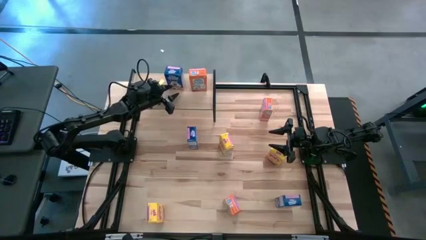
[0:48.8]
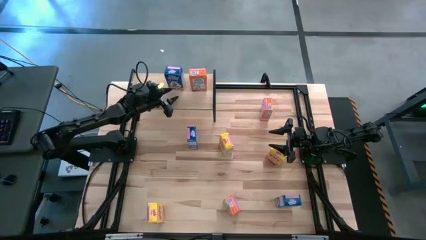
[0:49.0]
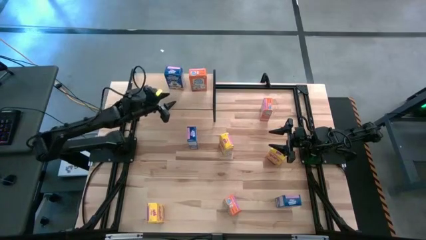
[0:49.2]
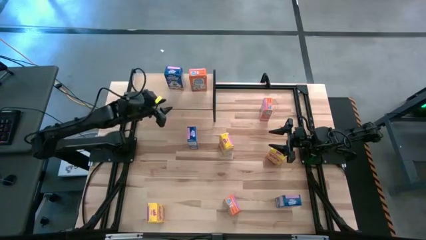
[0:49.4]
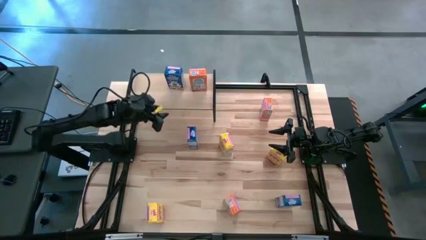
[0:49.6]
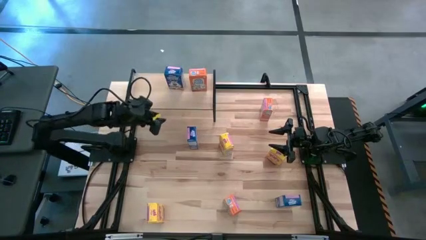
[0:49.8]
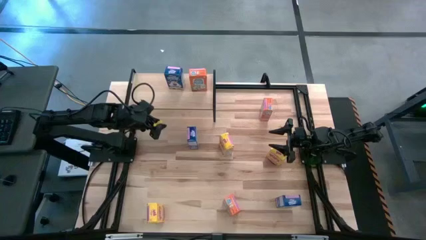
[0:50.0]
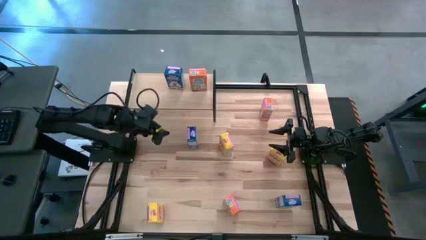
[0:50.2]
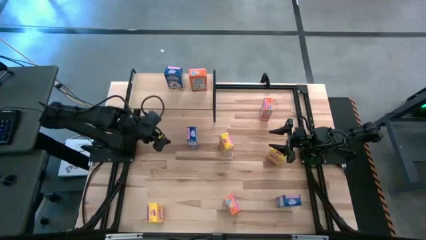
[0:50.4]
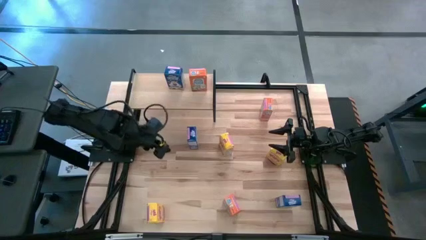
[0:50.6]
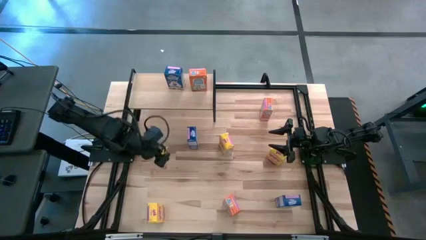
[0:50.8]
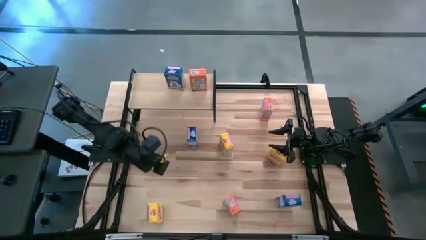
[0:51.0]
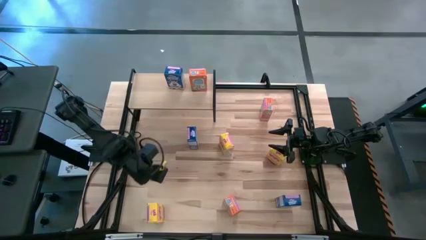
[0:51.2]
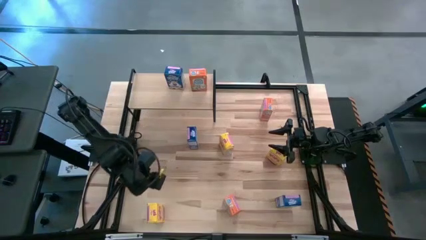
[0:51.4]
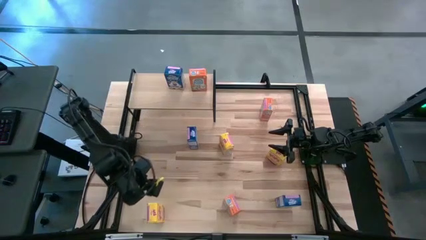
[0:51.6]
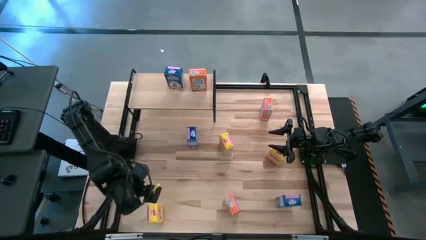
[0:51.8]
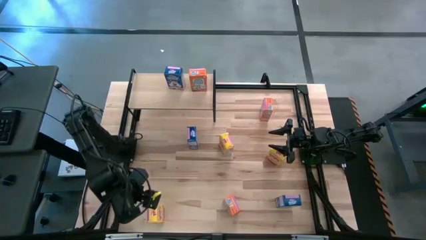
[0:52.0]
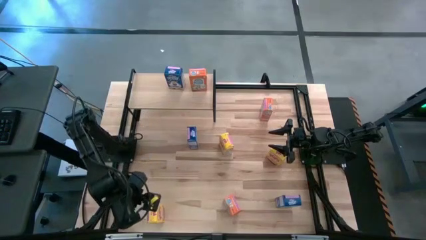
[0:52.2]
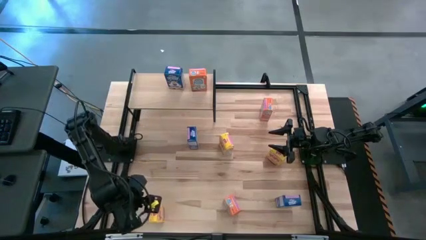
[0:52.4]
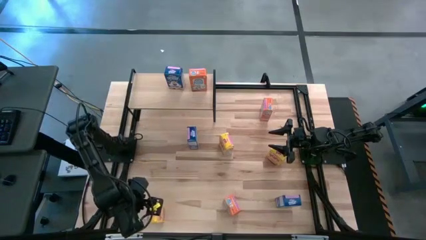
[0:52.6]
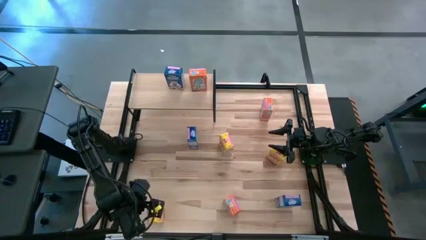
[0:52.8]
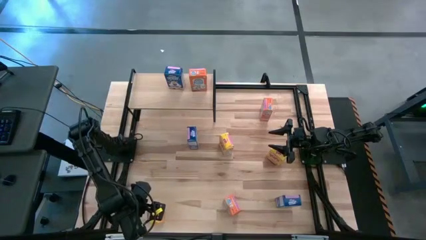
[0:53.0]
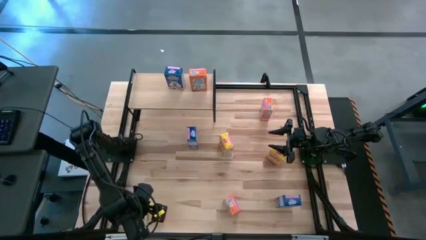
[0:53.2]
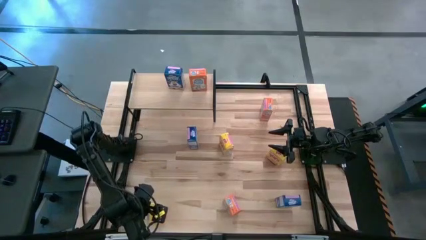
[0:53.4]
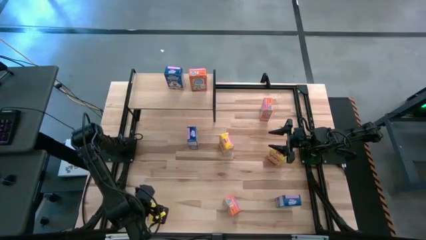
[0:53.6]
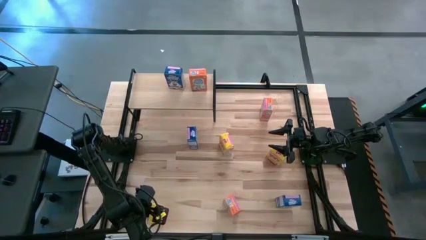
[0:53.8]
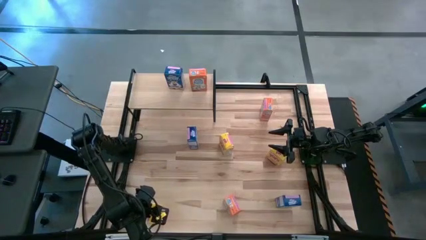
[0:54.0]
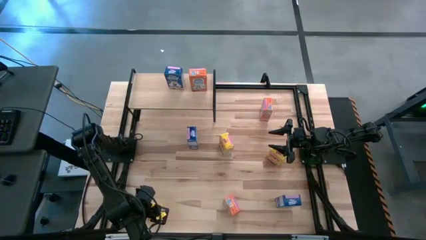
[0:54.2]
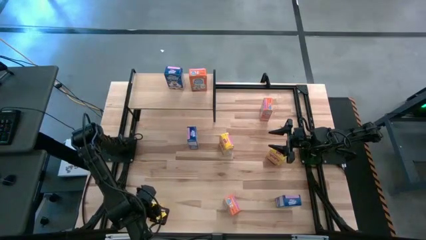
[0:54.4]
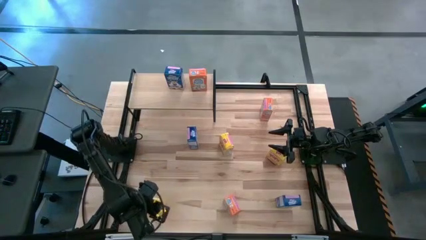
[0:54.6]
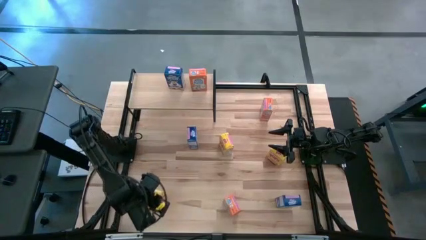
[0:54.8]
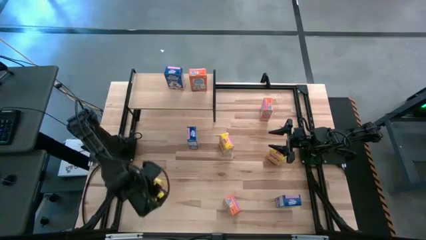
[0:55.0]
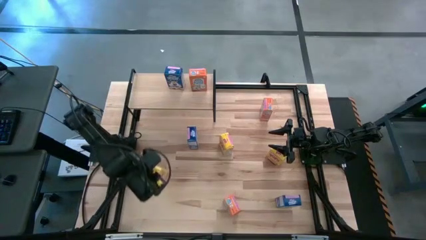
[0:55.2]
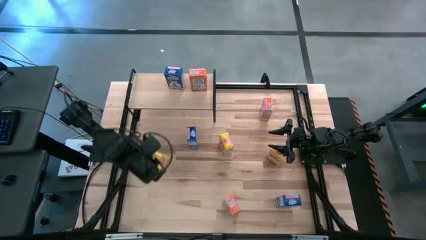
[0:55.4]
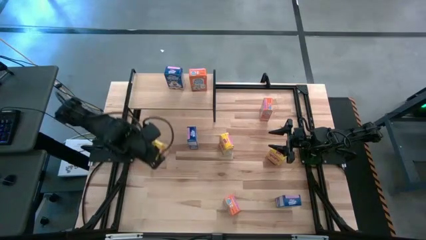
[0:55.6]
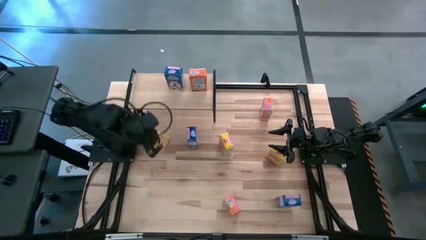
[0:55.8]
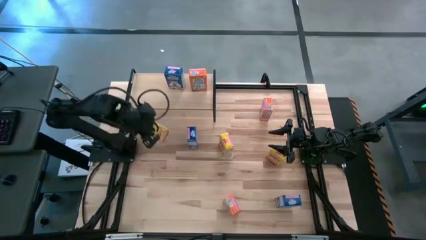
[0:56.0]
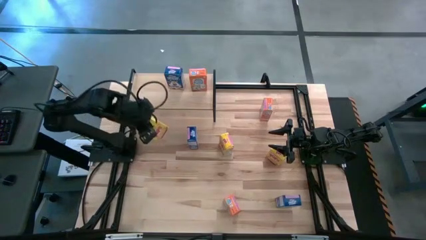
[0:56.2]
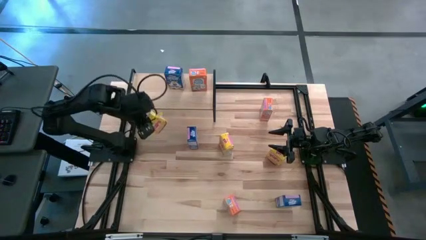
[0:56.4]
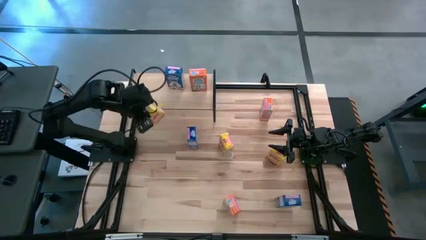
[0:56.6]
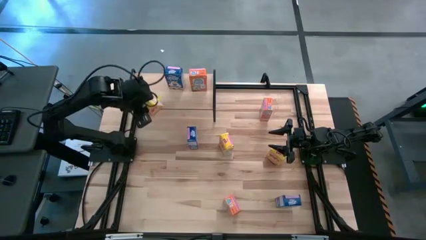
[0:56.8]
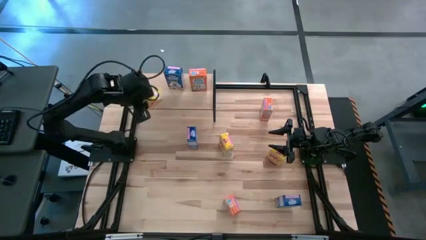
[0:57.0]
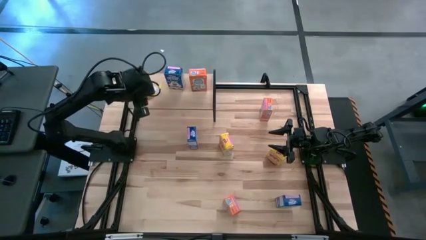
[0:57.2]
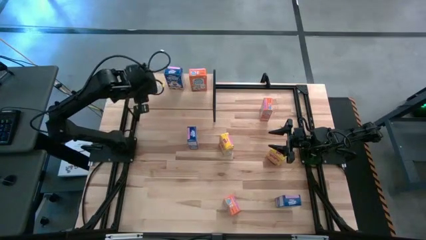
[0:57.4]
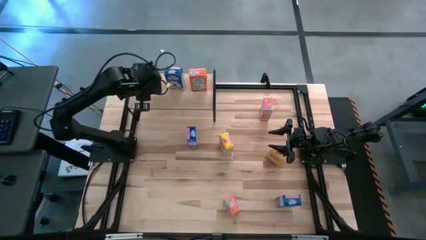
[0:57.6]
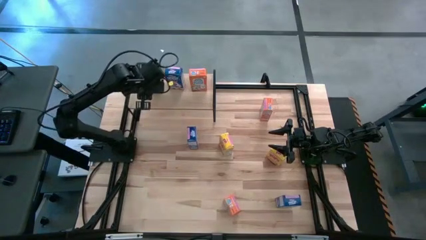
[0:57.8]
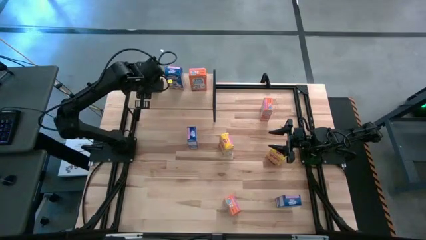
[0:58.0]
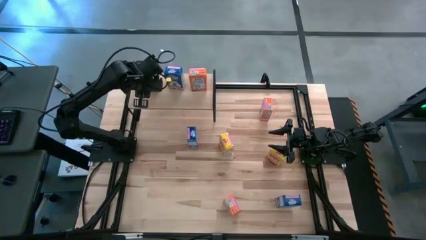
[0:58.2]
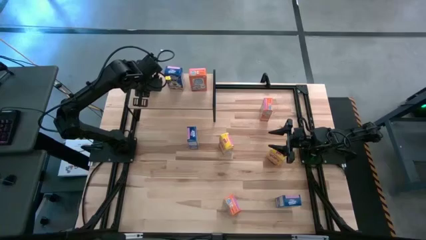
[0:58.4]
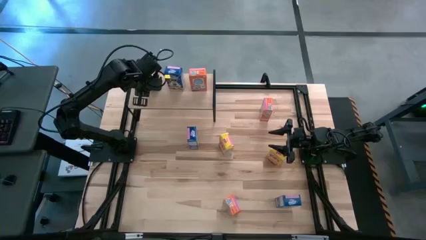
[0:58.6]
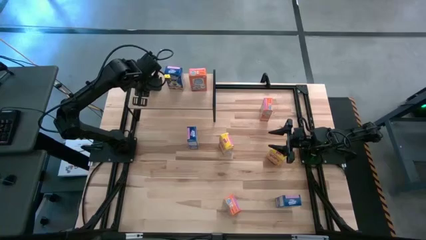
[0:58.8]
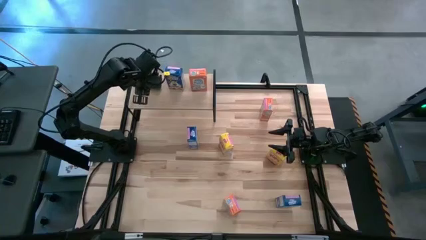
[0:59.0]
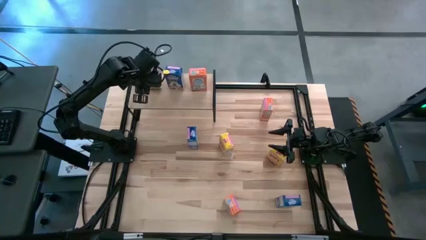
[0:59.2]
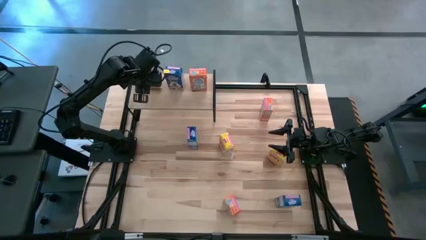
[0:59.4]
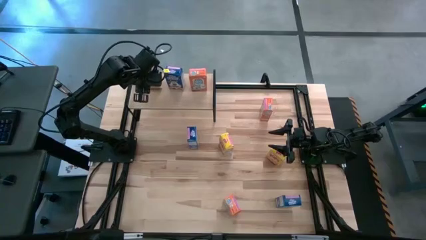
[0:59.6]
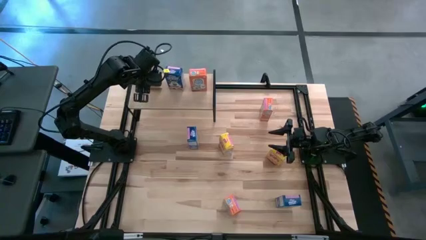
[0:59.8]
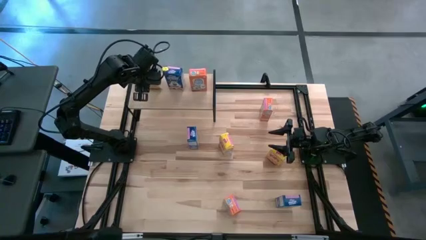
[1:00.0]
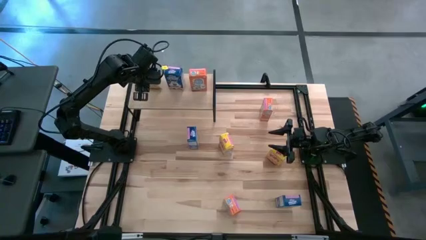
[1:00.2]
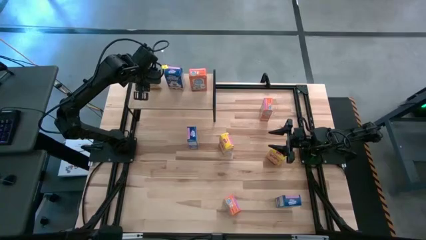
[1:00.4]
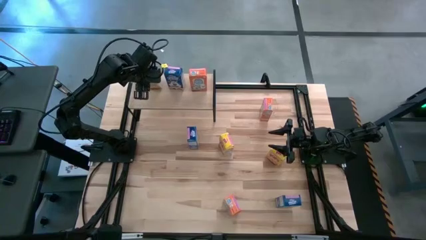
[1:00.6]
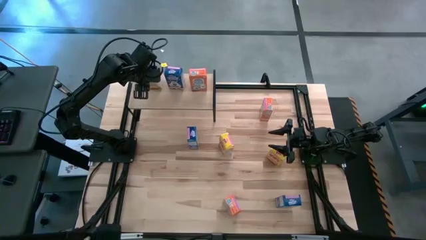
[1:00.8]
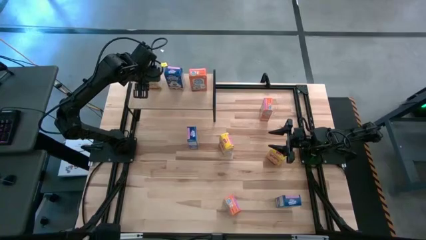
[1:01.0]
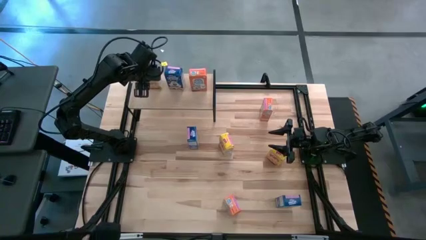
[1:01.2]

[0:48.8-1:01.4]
Task: Stack cereal on shelf
Put the bottom left yellow cereal box on the shelf

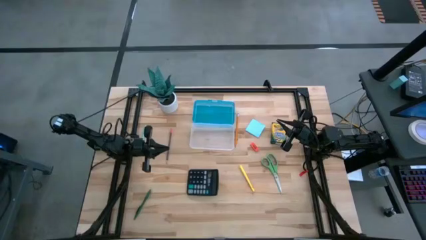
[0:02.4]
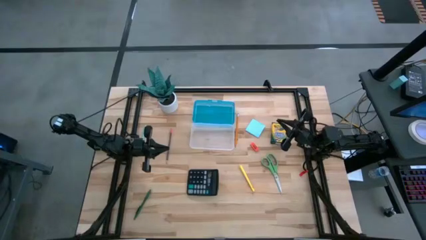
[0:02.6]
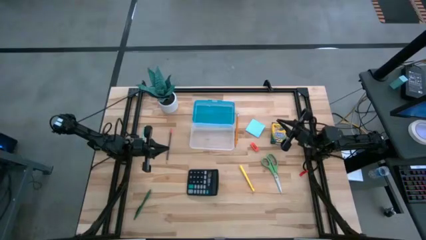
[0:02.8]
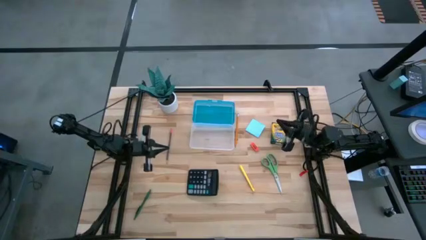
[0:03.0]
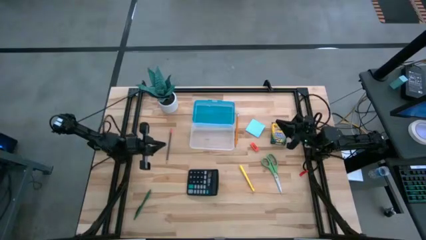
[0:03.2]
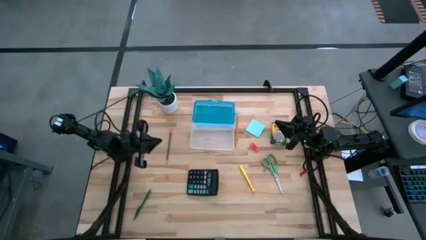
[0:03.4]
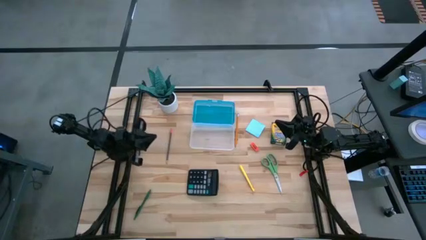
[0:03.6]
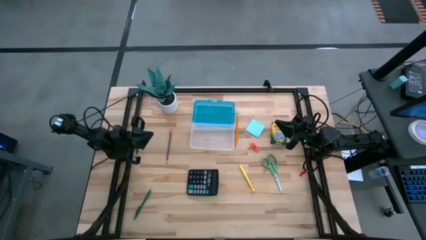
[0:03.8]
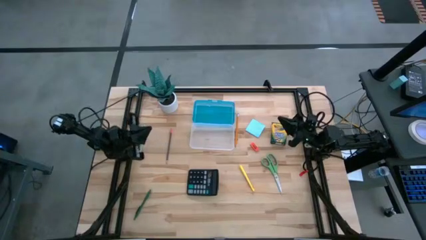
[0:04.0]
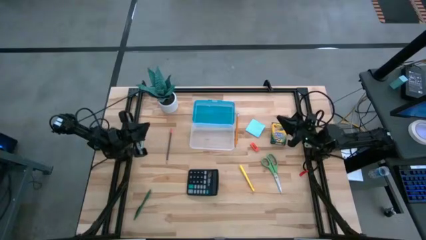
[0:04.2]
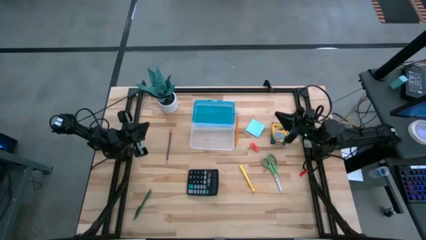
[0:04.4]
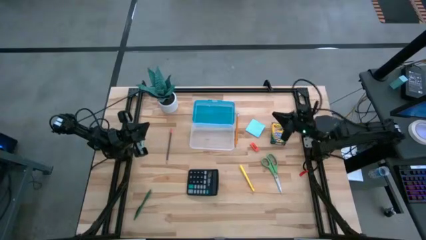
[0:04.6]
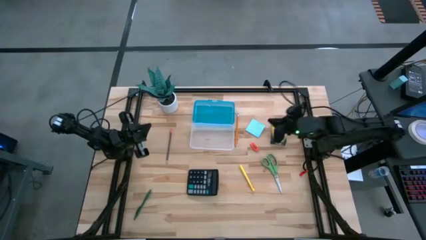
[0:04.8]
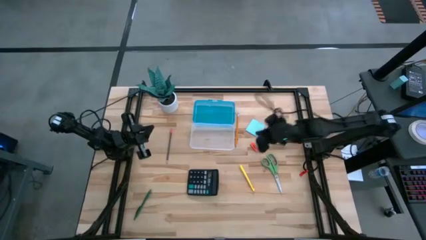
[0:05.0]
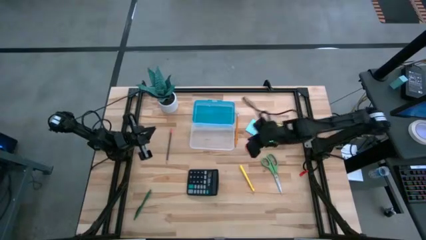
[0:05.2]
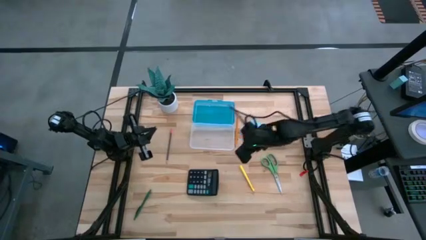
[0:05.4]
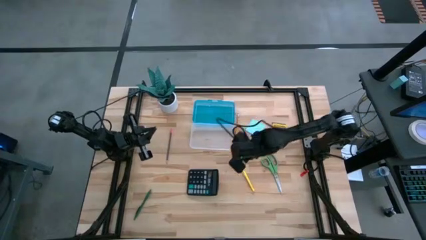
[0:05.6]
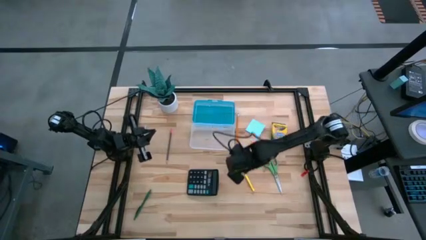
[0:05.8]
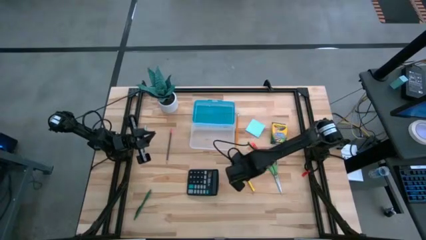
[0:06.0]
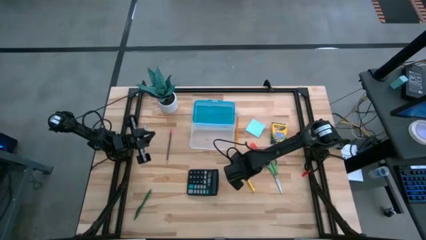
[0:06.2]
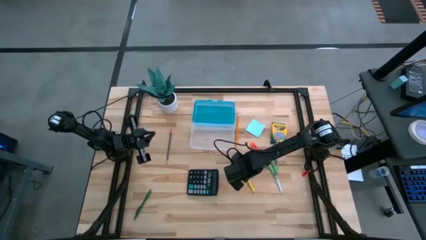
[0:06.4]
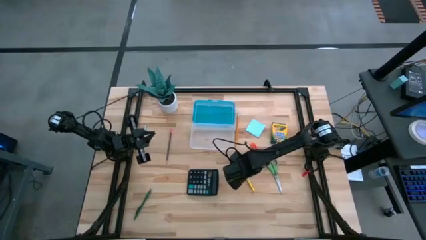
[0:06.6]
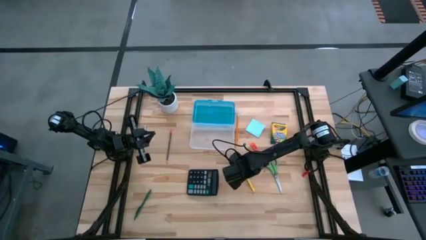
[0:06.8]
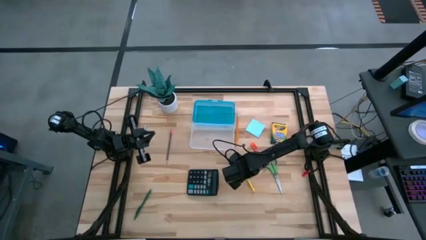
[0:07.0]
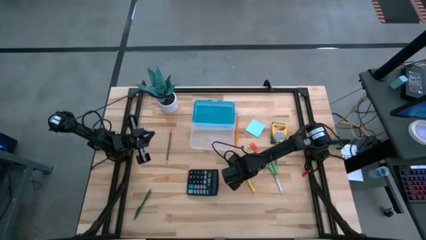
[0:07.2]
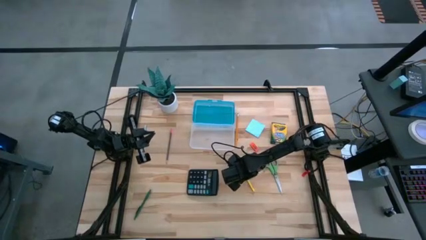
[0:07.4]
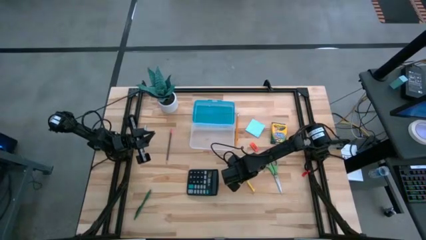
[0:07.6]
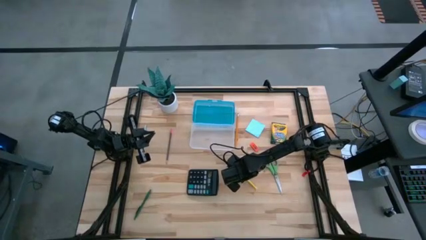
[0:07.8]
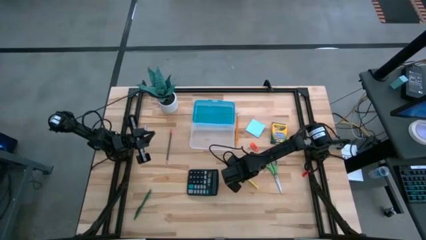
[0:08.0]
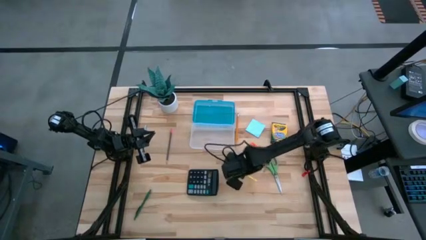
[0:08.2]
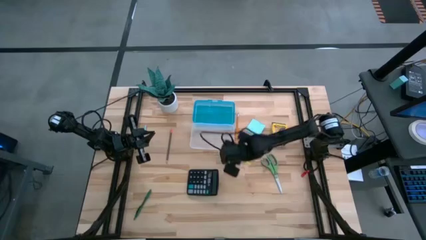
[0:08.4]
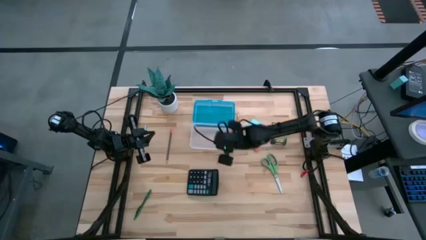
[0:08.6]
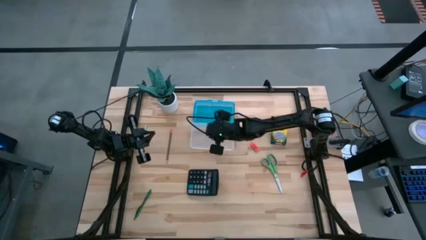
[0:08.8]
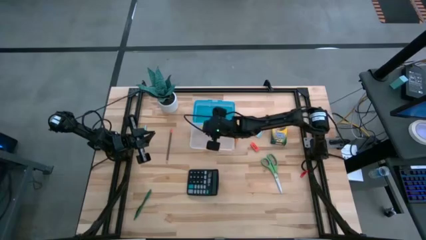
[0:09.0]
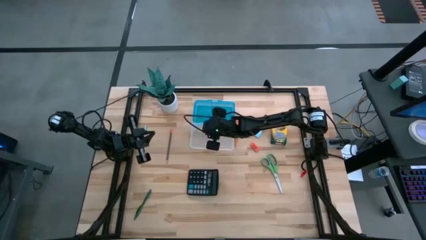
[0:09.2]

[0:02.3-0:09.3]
Task: Pack school essentials
Put the yellow pen into the supply box
